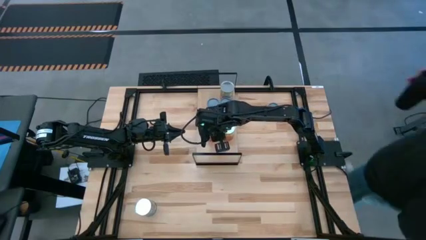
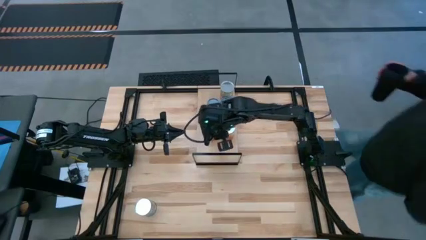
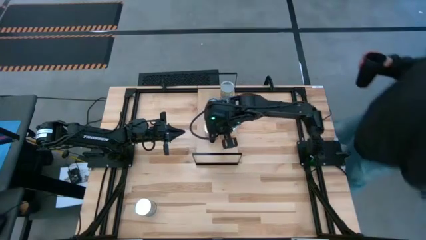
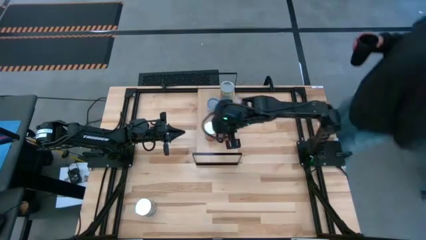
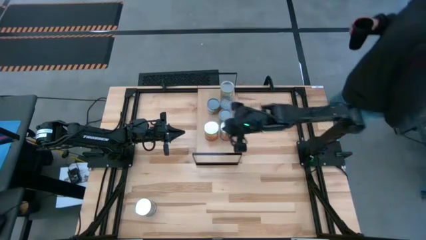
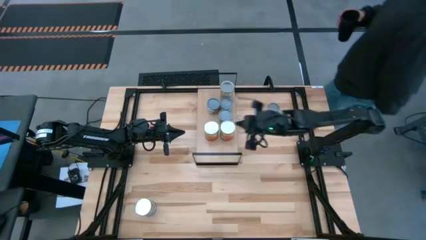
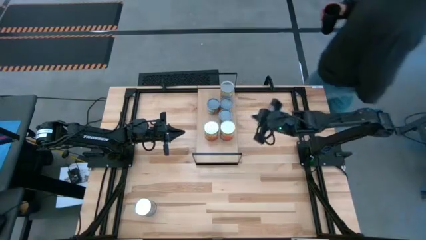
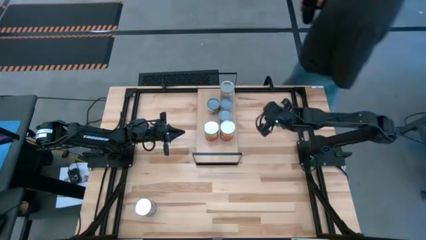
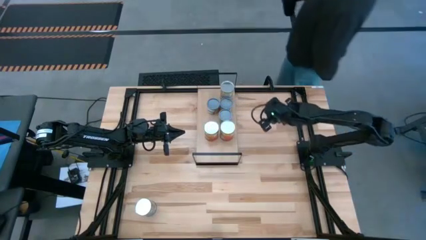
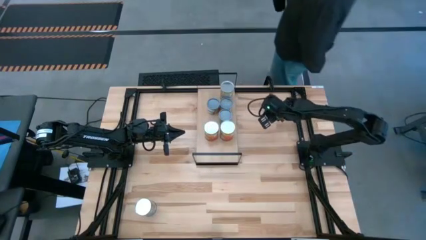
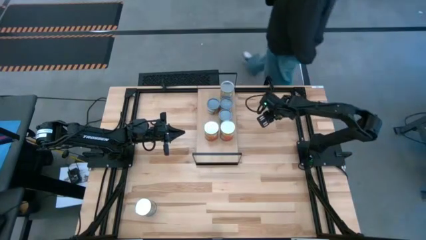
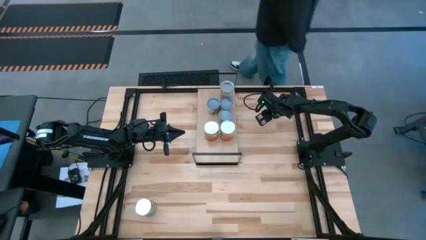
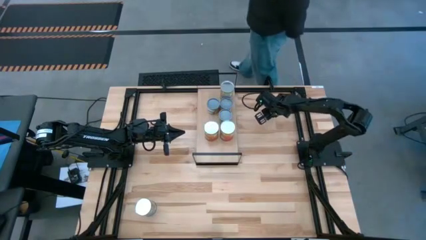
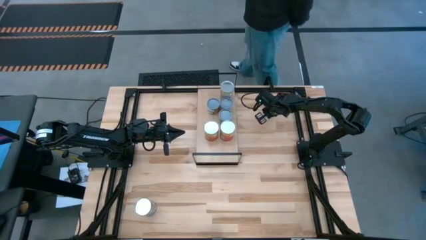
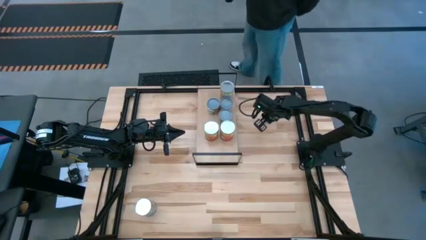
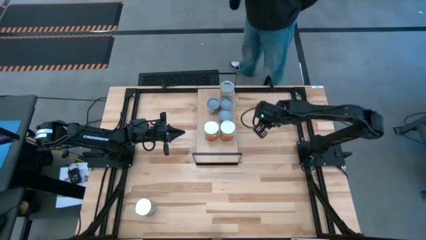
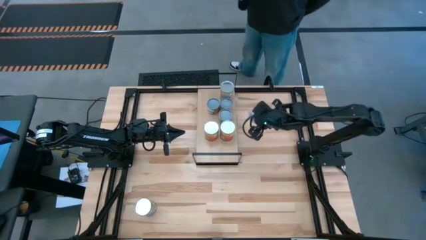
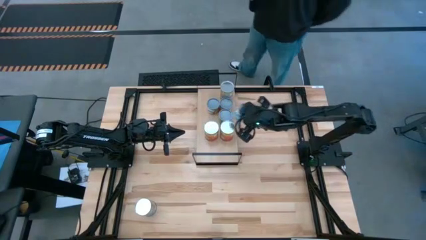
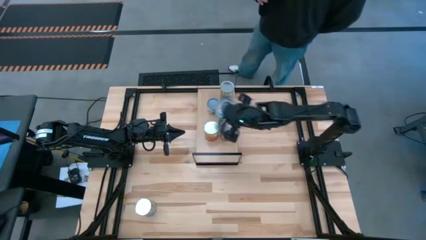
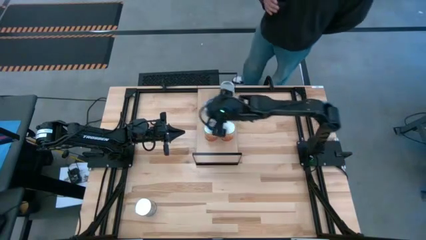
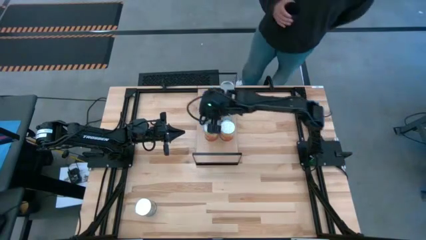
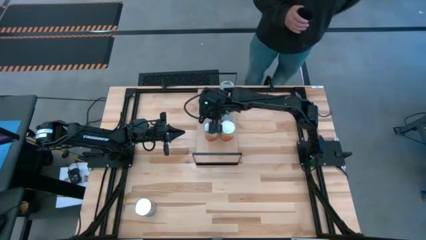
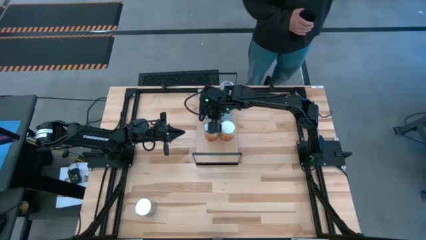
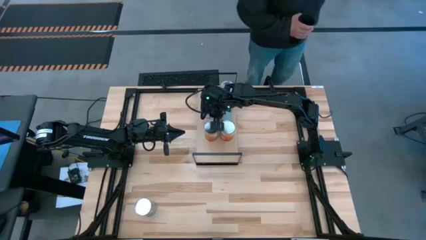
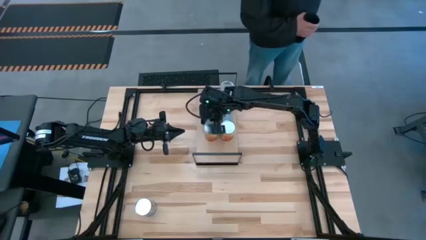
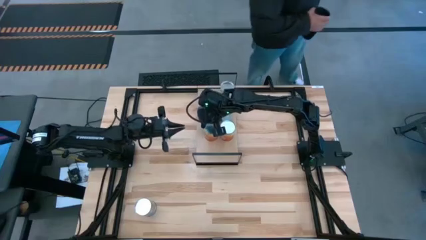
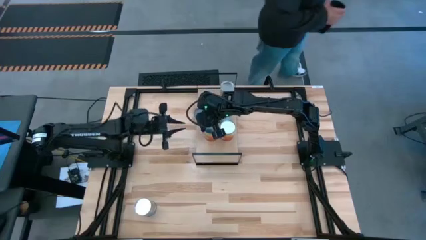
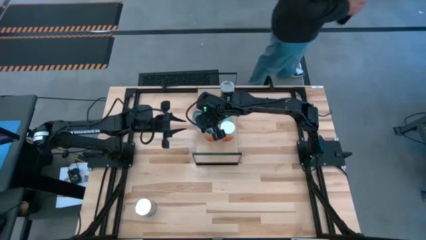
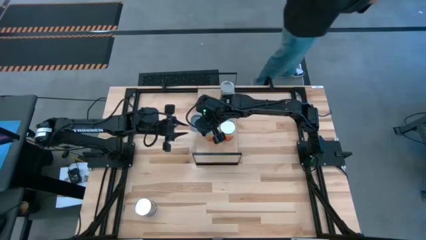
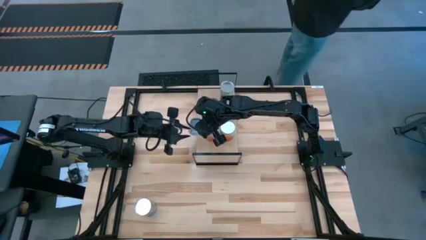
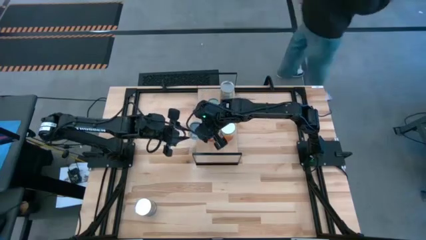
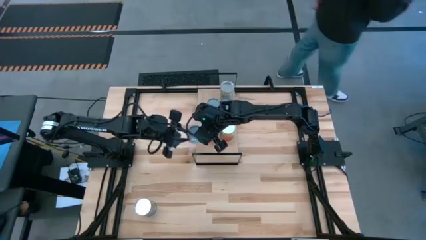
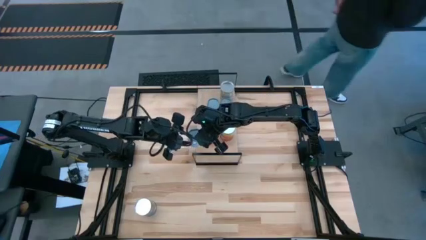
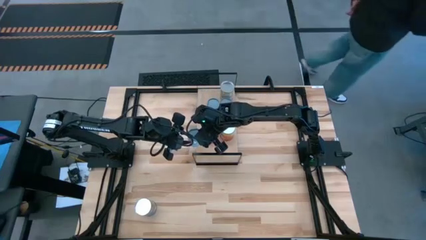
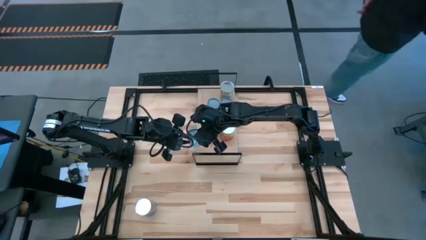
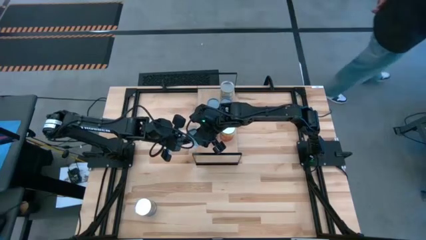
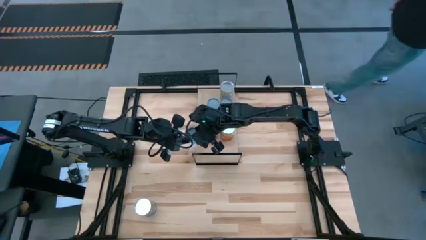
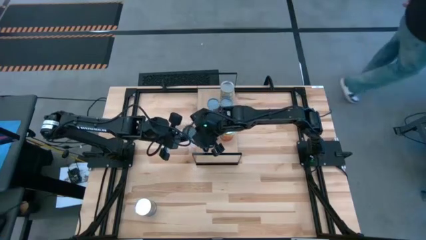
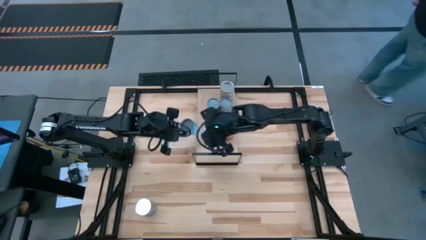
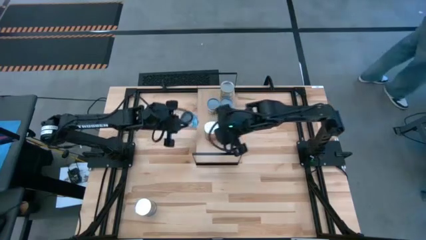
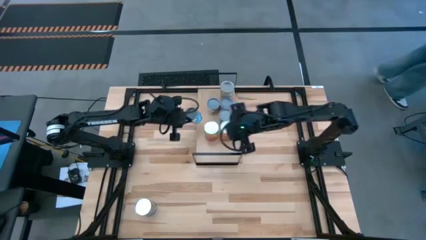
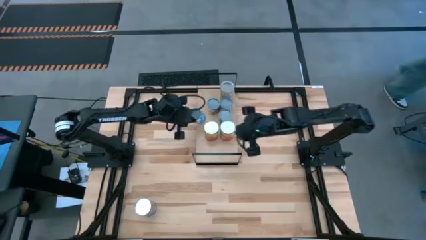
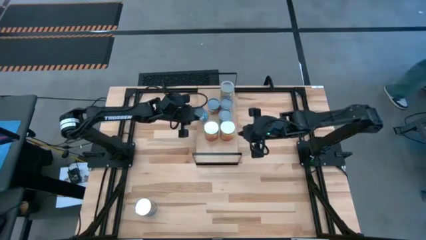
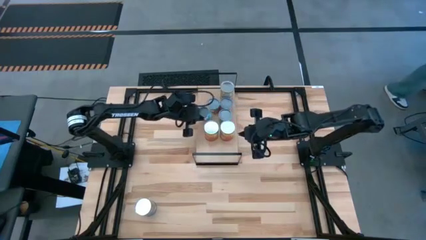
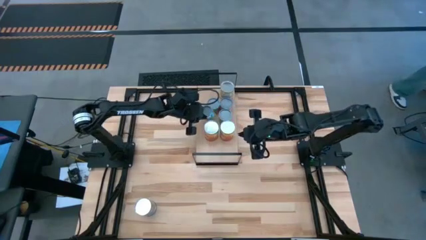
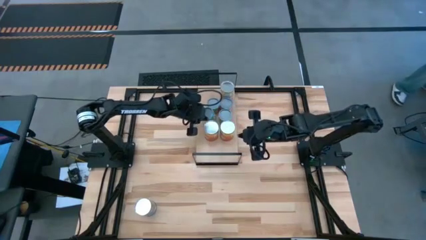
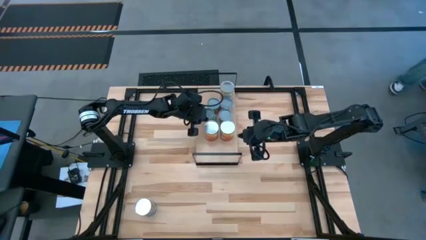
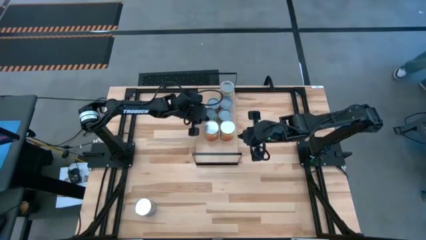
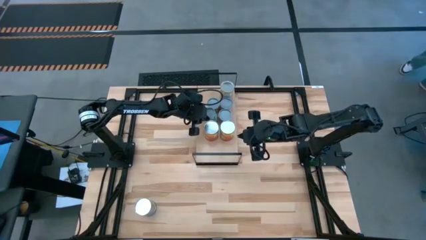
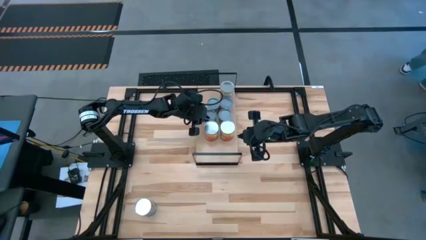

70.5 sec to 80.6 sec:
Task: Pick and place cans onto a shelf
Put the small canned carrots on the shelf

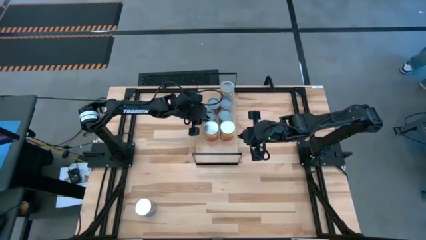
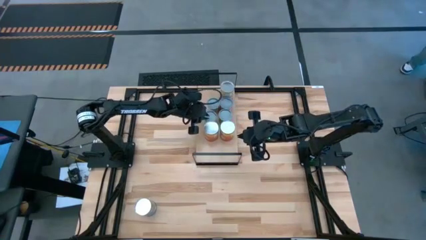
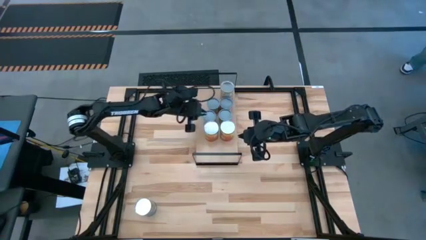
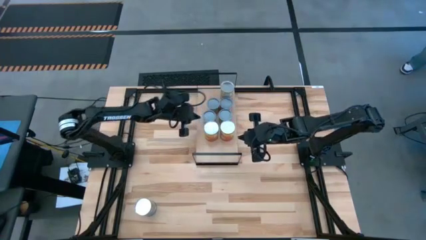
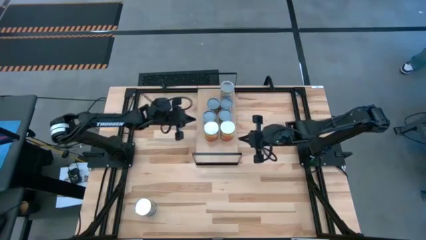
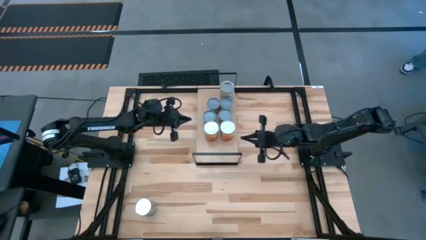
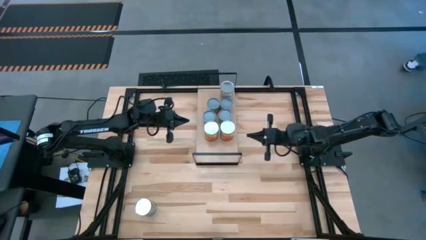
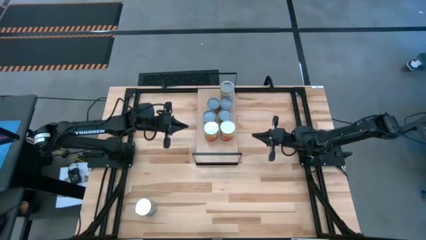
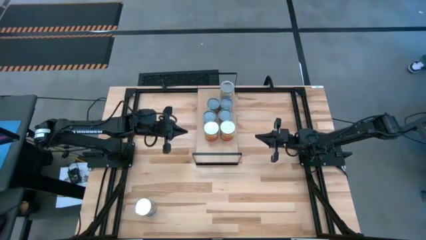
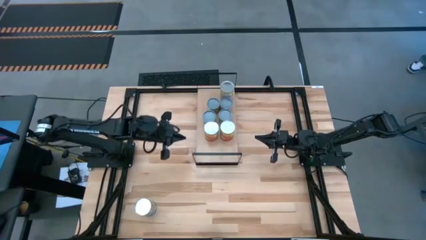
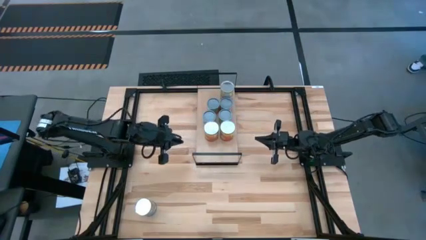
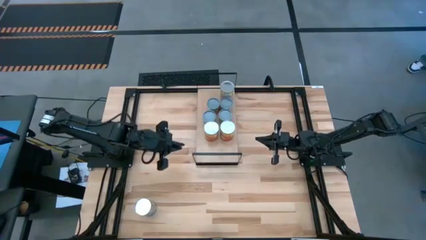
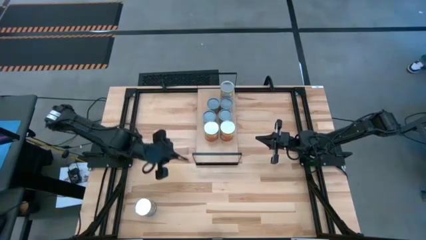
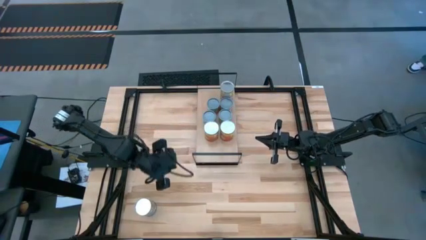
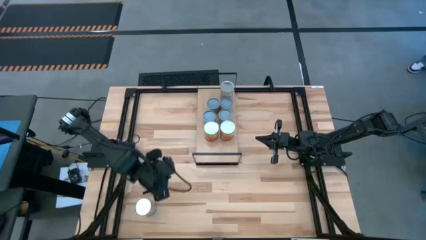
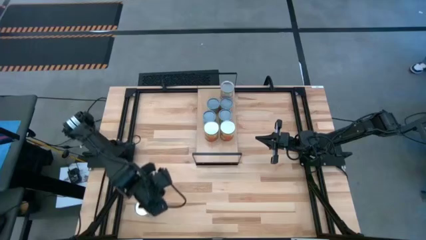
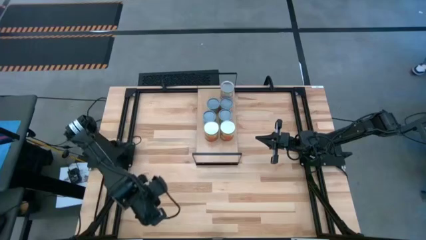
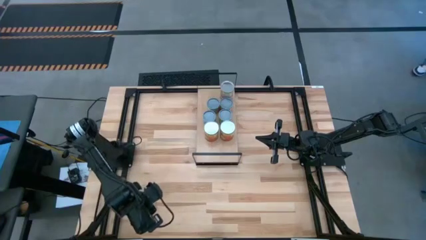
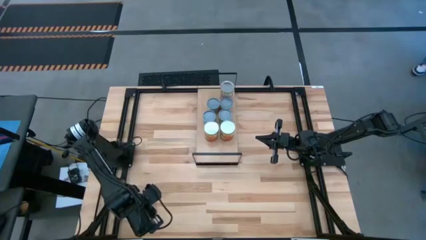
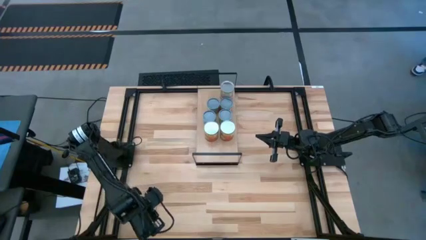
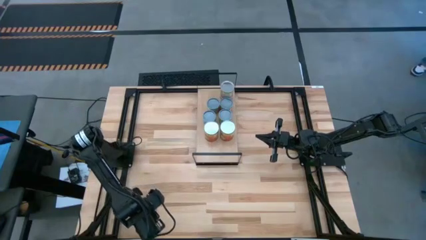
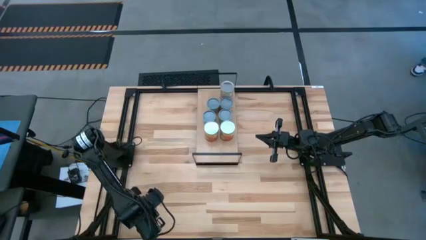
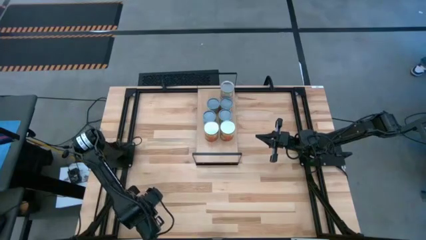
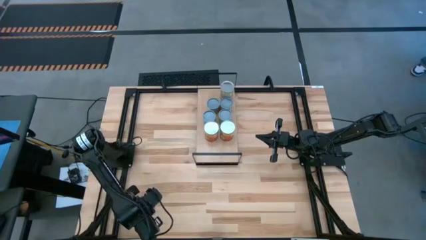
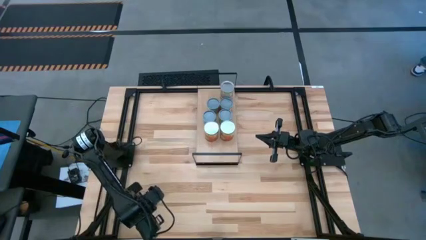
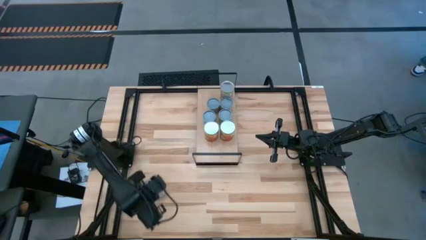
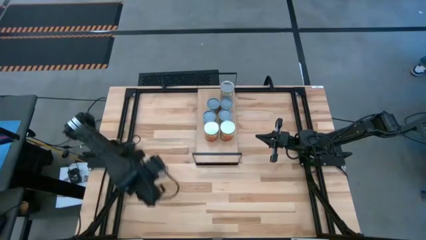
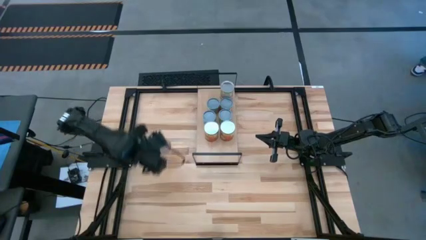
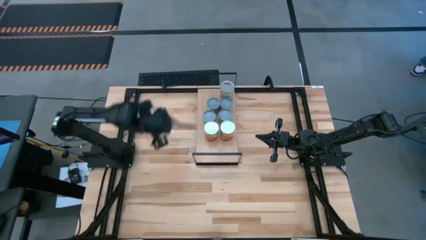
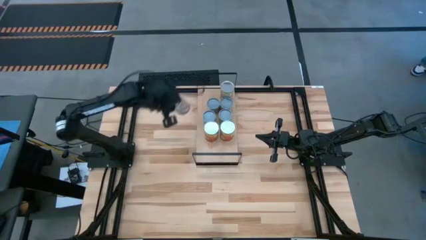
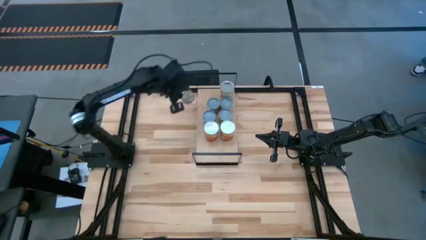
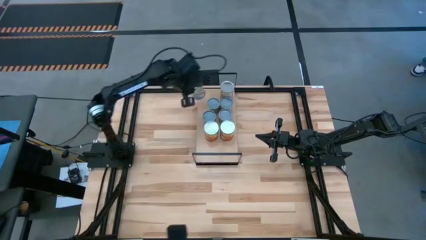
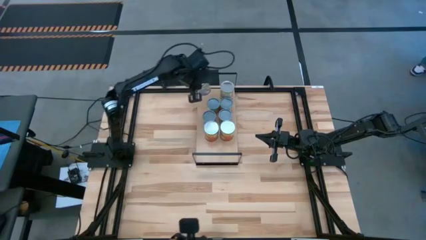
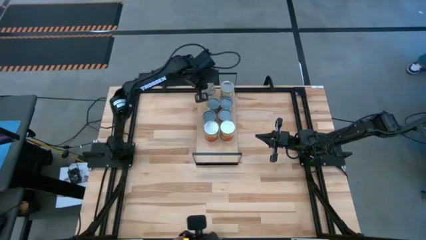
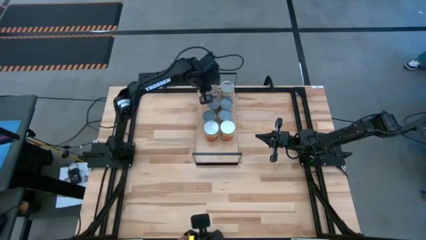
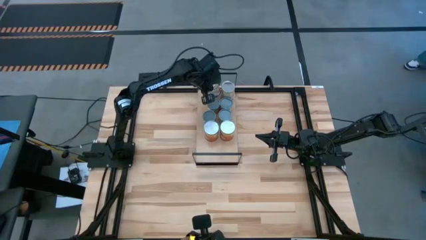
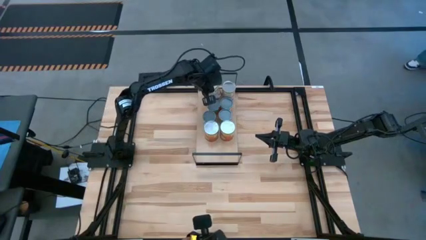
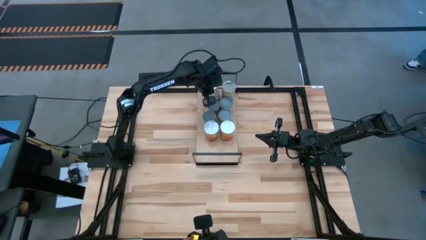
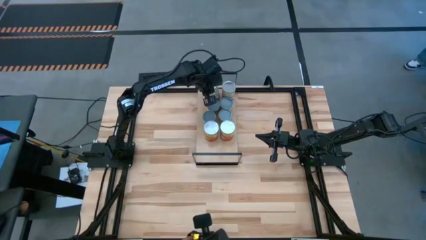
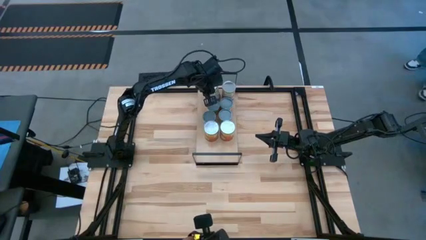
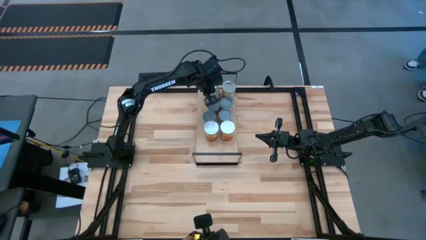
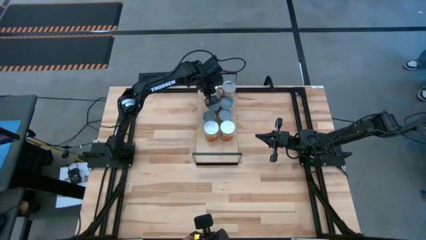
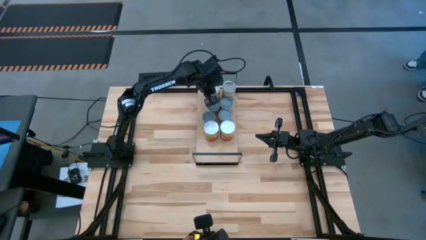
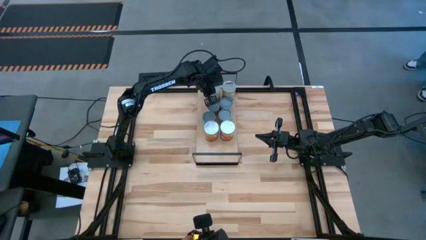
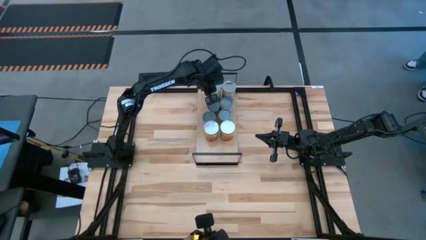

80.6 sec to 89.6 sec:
Put the large canned peaches on the shelf
